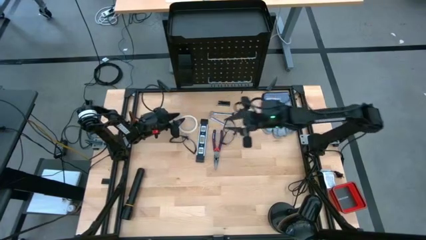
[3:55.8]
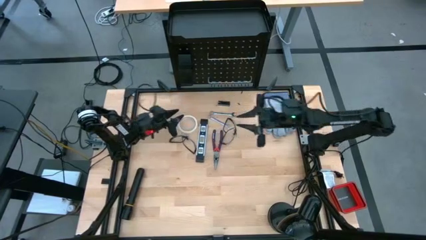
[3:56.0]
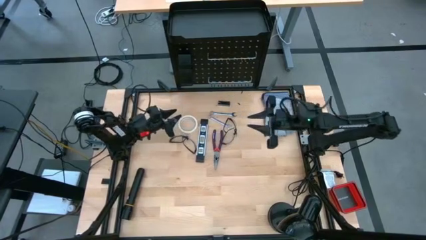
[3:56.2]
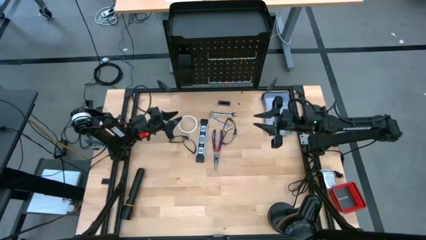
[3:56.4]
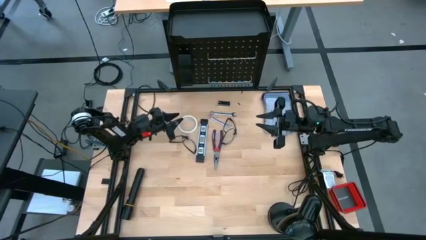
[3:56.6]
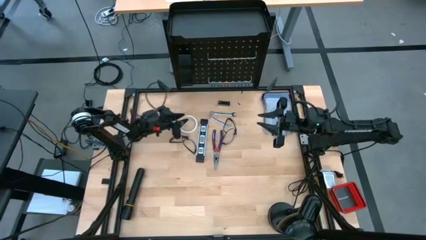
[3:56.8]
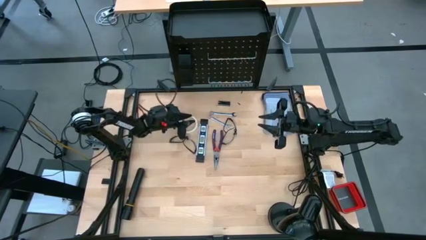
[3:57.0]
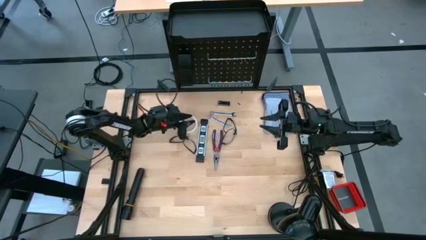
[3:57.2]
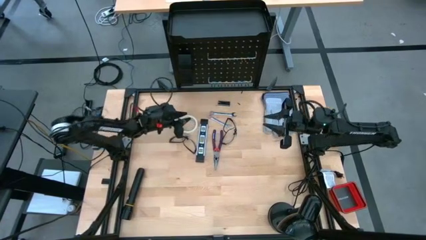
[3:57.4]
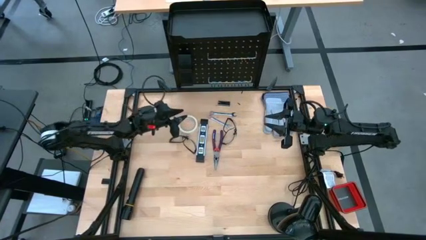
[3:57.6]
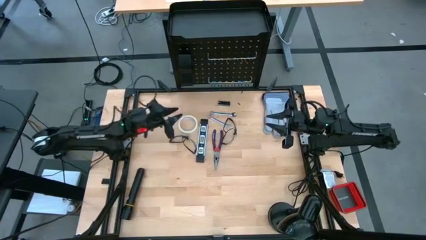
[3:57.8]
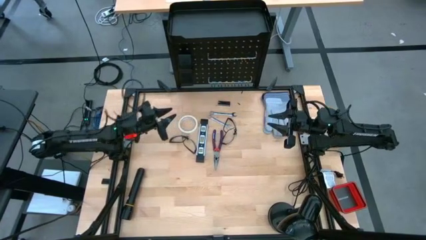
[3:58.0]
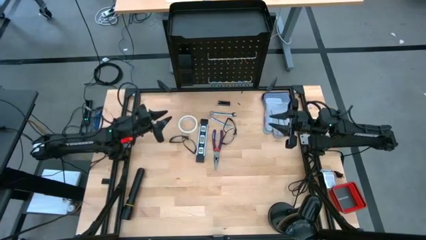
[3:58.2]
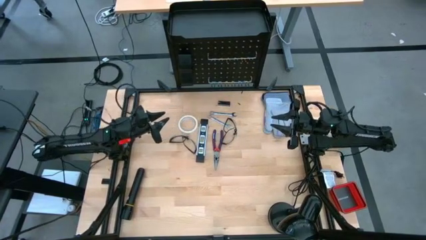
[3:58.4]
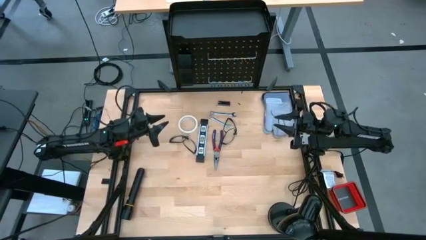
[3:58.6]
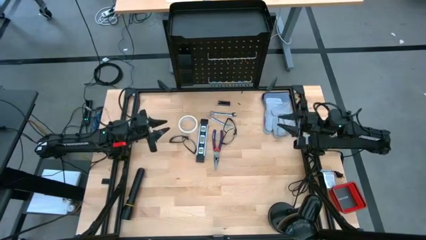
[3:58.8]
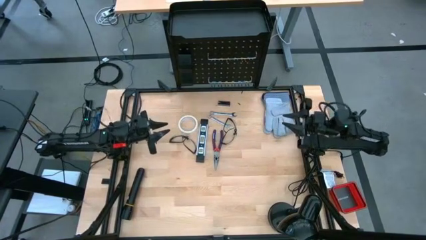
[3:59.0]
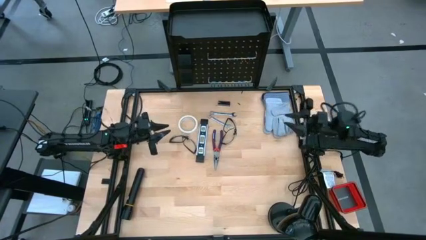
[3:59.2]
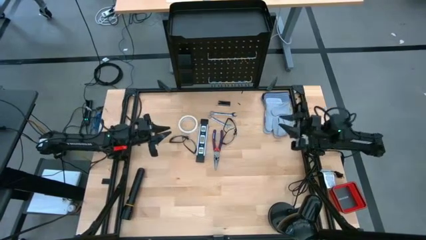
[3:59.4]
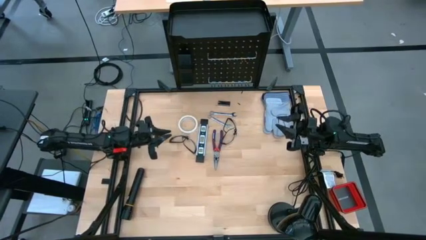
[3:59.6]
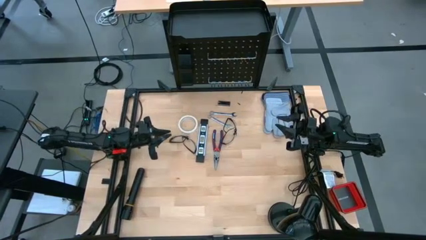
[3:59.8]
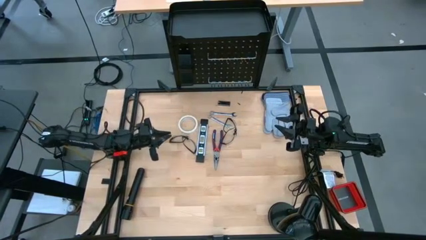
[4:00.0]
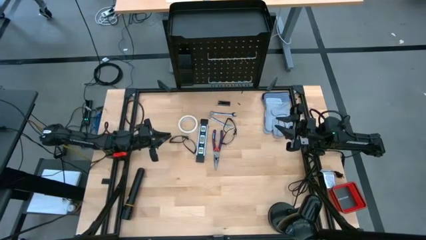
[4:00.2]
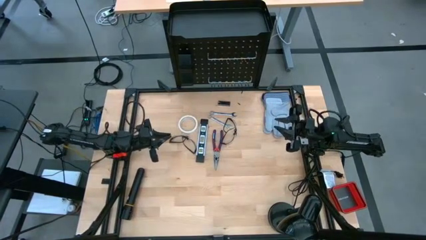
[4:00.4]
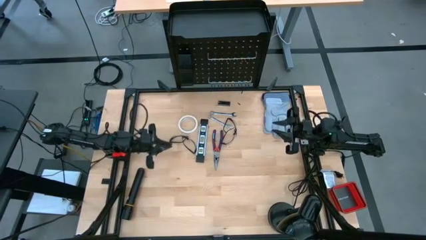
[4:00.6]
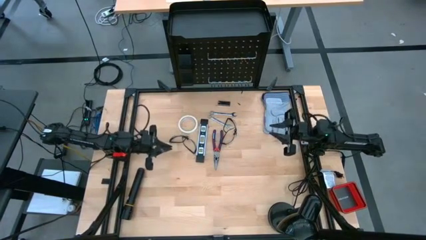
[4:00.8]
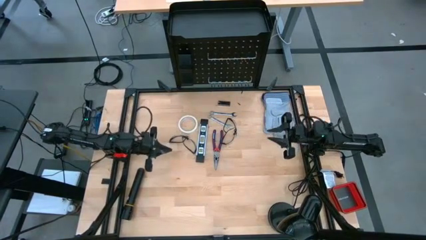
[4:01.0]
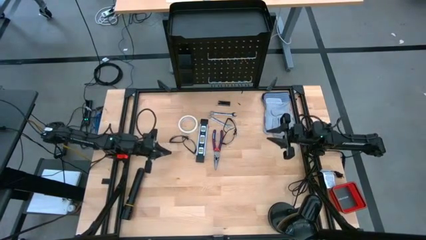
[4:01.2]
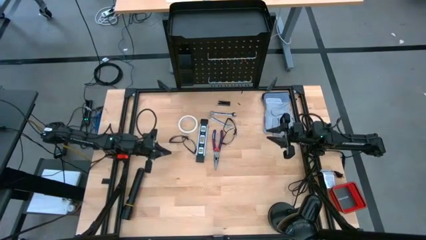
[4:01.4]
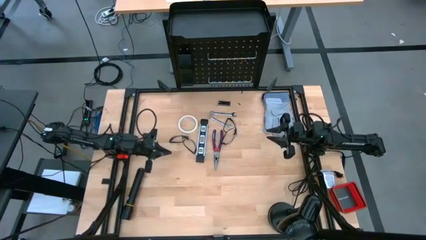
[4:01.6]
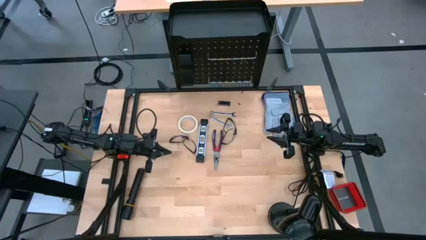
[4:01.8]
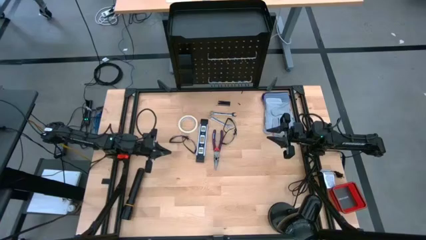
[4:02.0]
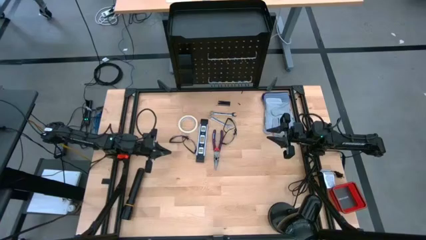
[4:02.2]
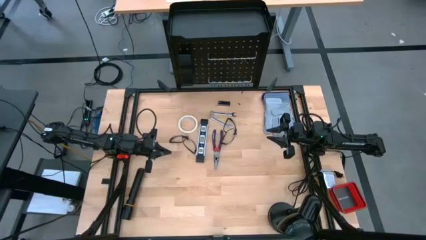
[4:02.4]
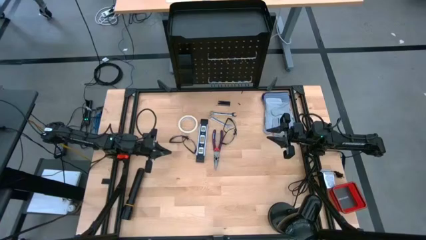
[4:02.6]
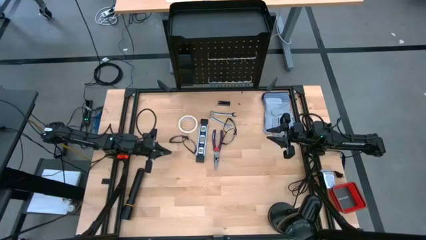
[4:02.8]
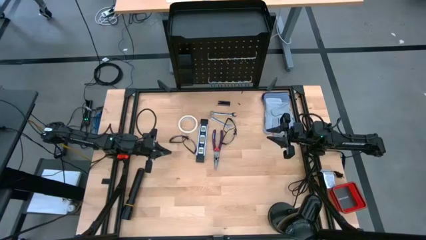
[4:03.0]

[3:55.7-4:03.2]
Task: Hang tools onto peg board
Return to Home Position

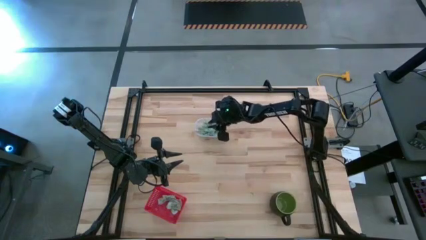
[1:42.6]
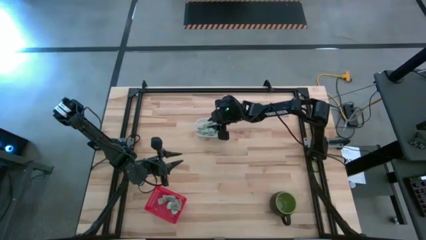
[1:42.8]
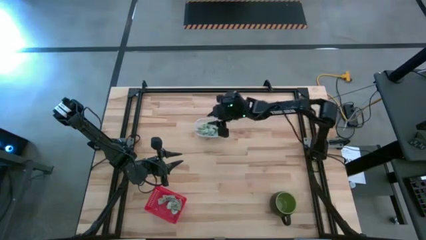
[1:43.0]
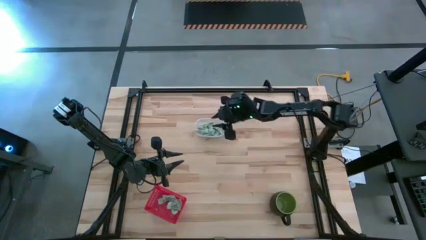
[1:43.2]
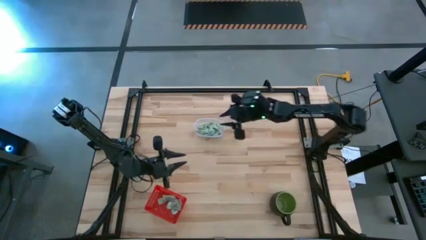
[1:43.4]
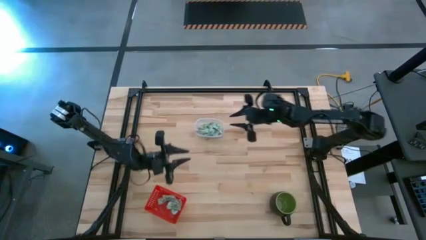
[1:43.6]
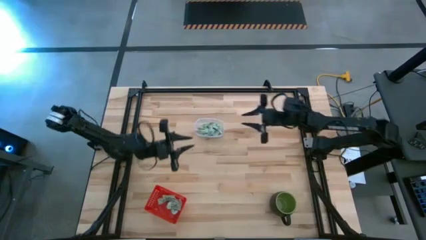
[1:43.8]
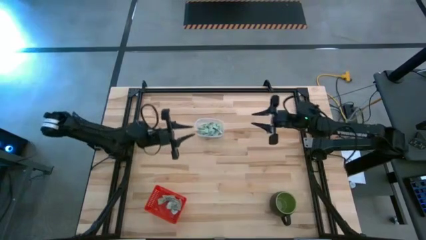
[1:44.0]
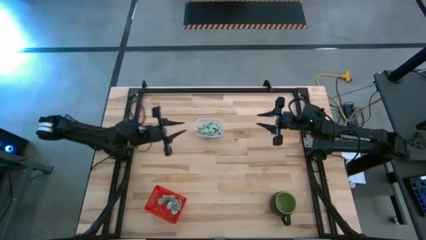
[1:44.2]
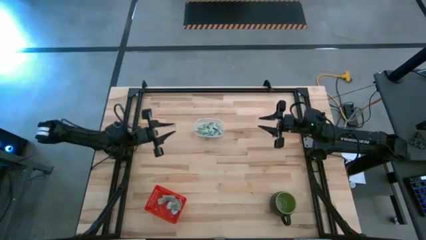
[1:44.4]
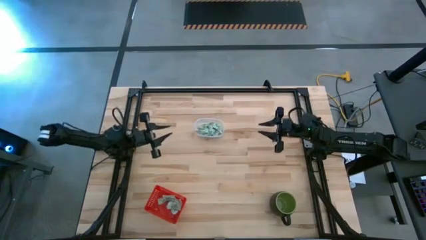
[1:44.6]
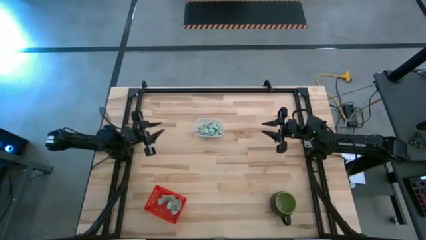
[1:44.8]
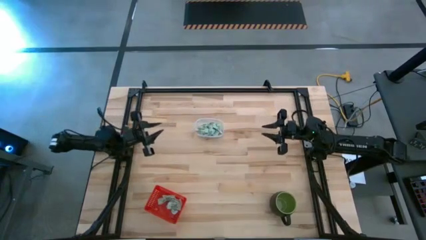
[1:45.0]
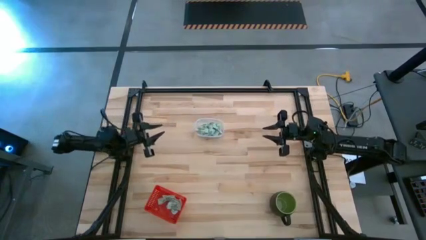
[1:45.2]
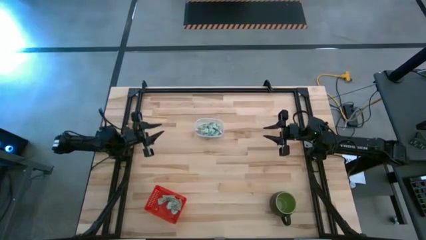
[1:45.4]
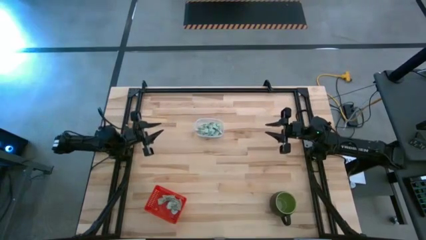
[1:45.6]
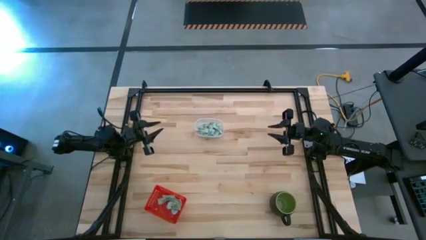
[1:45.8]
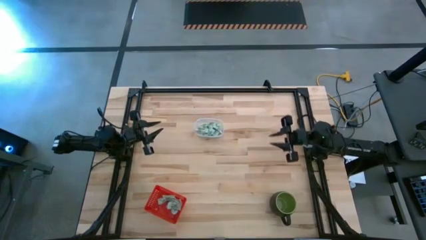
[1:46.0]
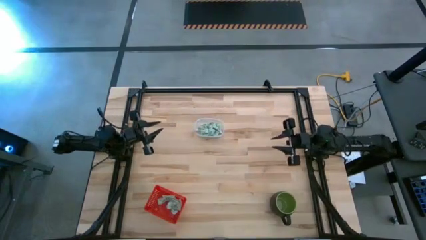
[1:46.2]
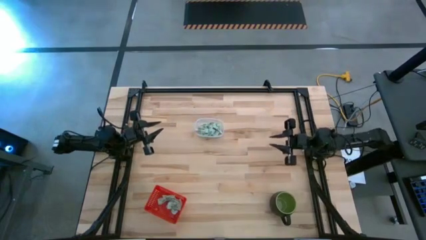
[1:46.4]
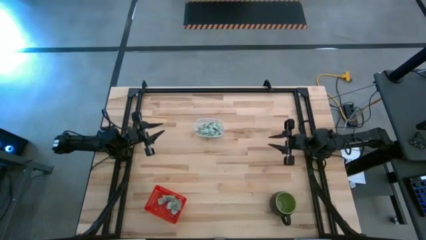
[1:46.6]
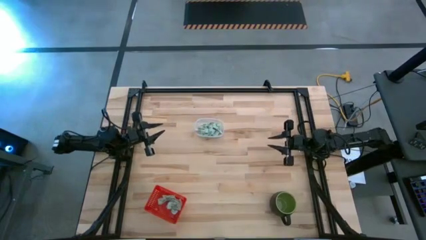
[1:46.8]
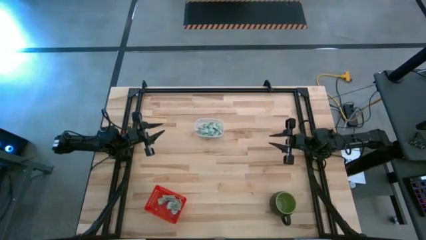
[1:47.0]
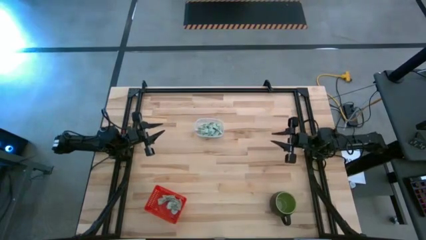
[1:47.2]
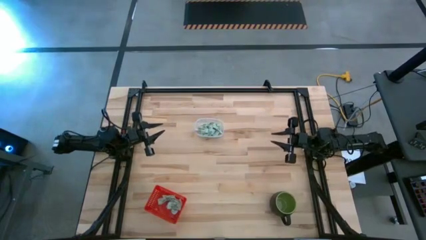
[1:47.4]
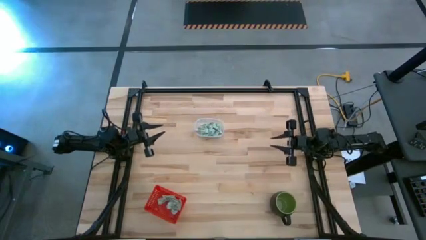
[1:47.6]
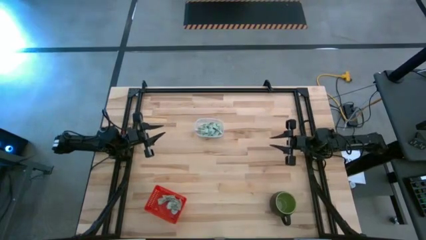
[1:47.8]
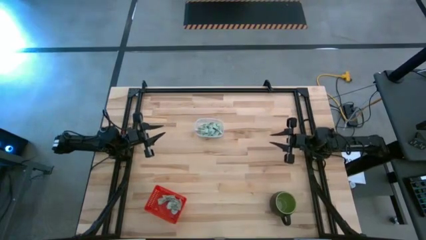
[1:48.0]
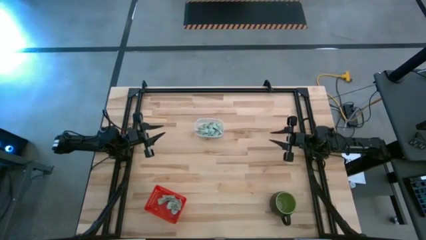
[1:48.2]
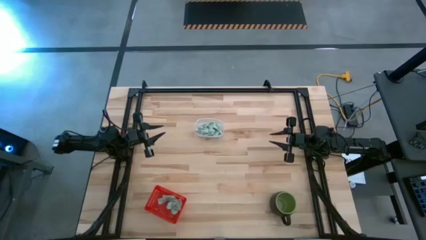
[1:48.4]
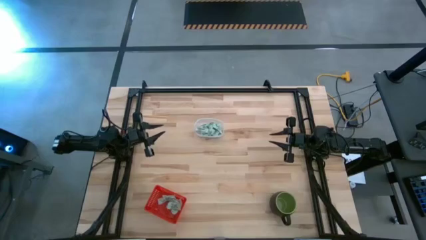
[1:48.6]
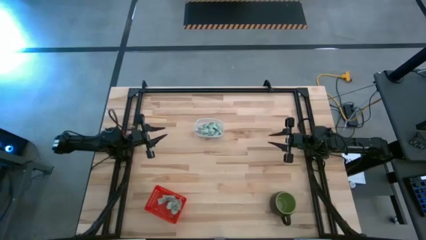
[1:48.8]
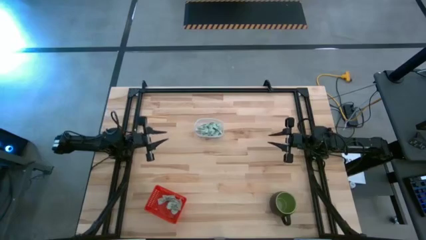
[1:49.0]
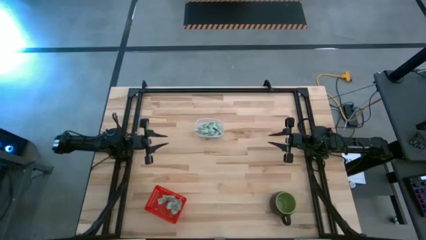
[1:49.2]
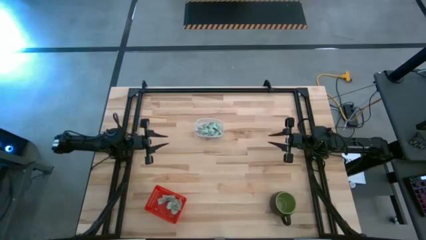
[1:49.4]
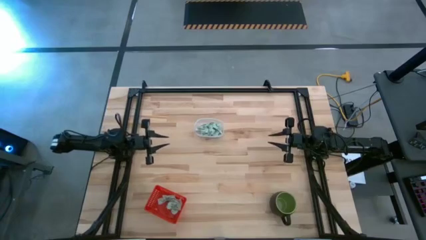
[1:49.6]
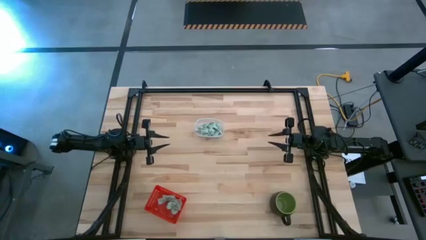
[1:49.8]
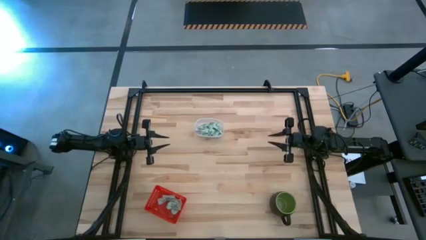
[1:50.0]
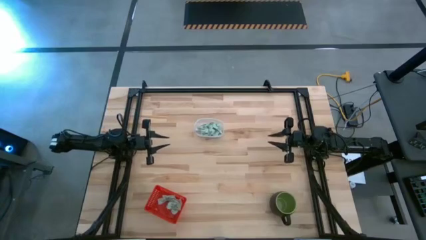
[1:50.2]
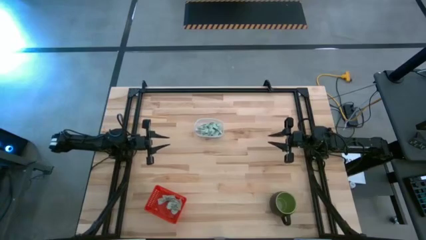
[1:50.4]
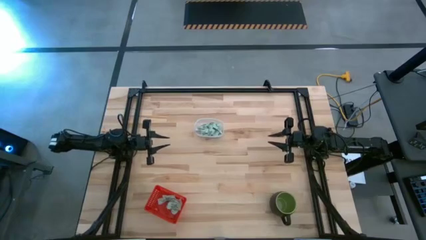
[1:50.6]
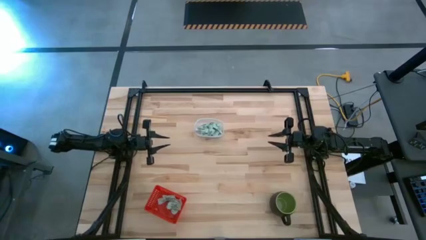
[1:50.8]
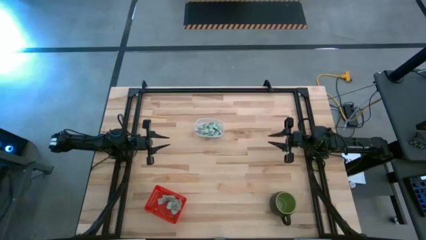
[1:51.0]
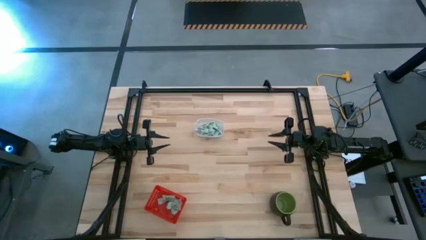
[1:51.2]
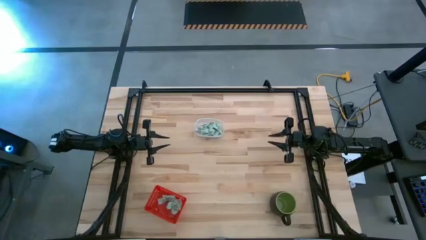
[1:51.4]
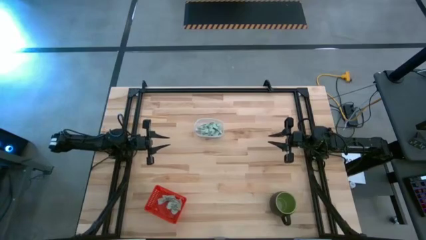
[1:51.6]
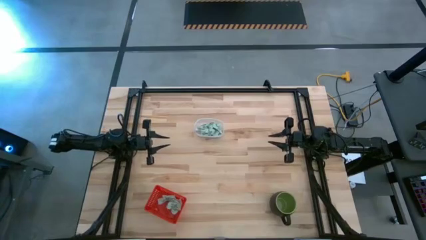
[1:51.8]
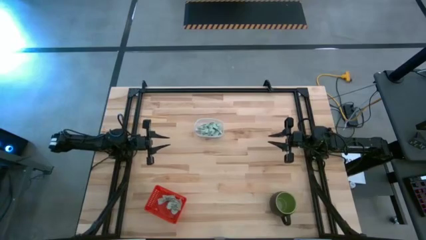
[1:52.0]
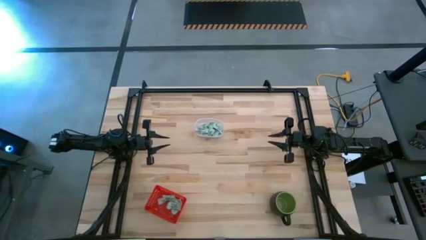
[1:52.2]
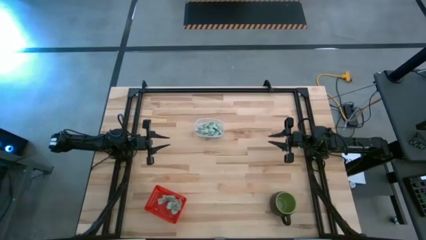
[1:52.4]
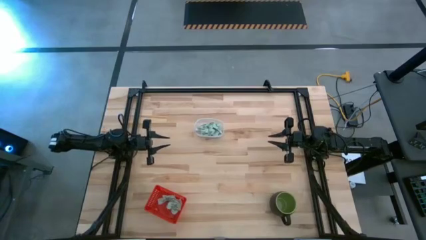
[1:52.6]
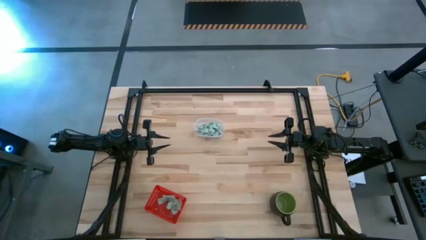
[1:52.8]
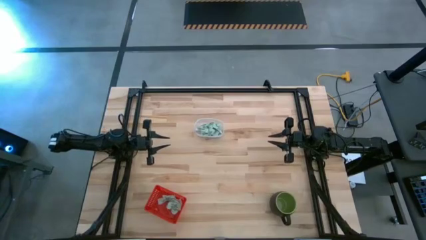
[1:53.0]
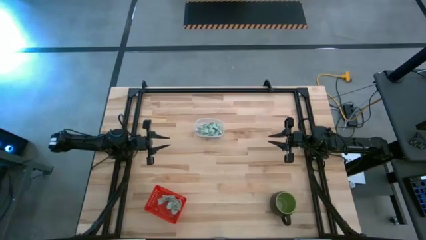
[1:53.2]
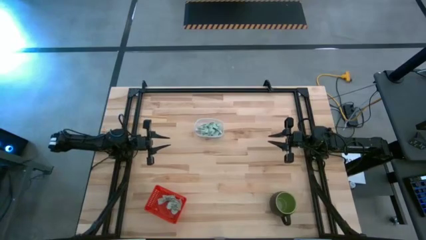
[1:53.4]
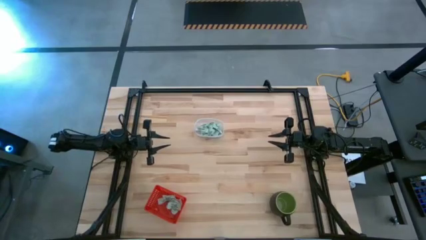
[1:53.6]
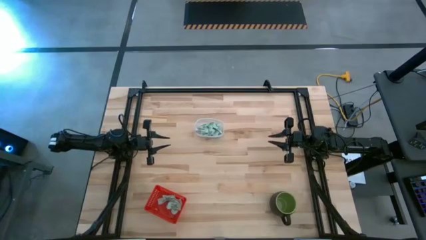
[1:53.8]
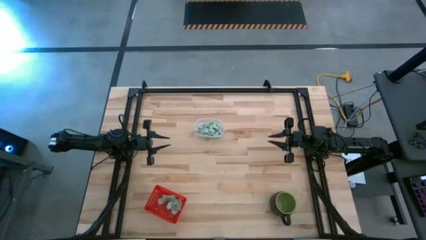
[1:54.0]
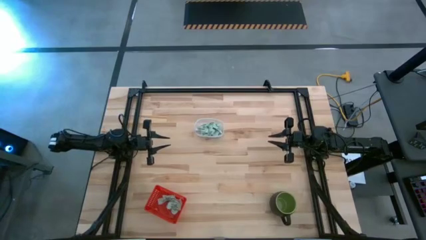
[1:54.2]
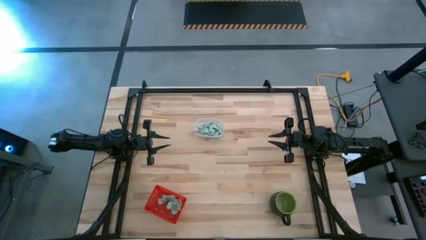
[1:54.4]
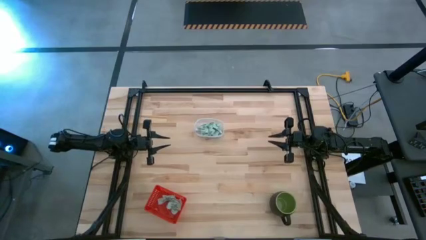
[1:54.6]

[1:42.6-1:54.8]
Task: Pick and place items into bin
Return to Home Position
